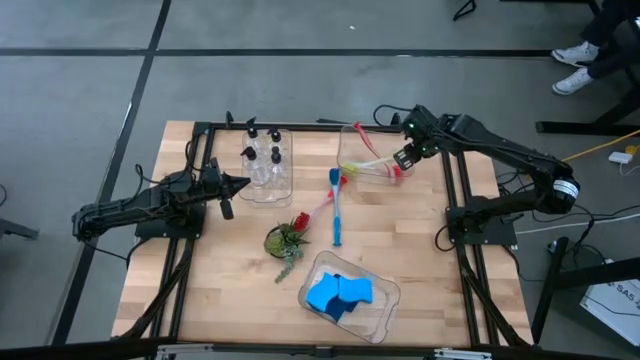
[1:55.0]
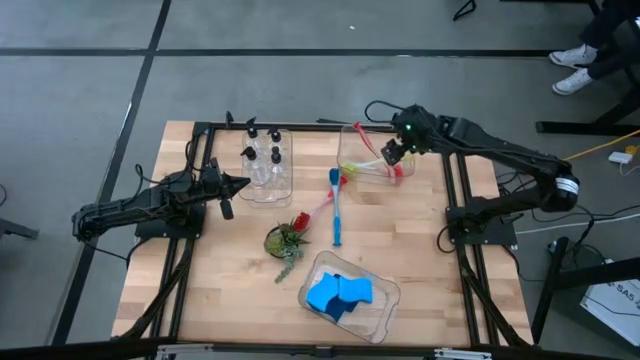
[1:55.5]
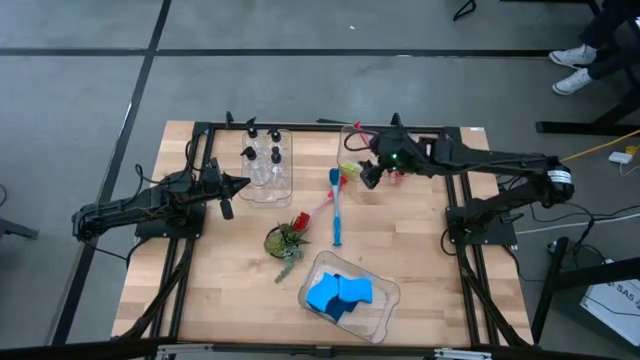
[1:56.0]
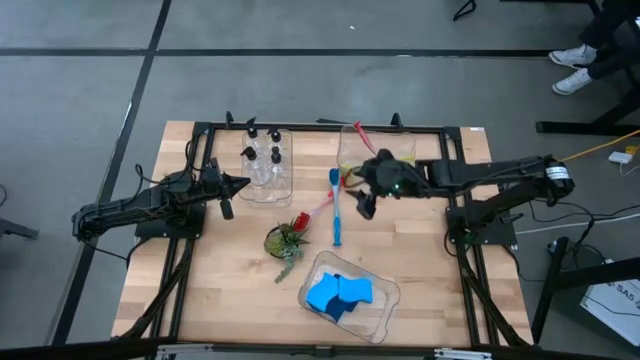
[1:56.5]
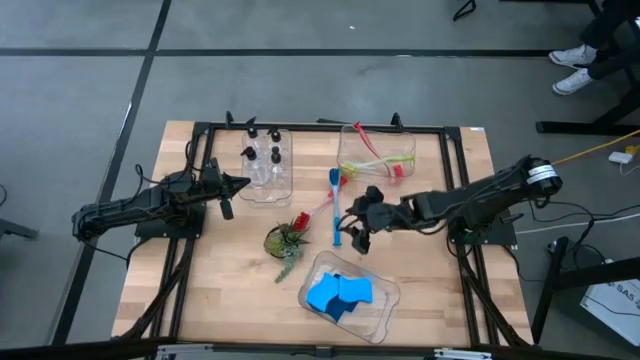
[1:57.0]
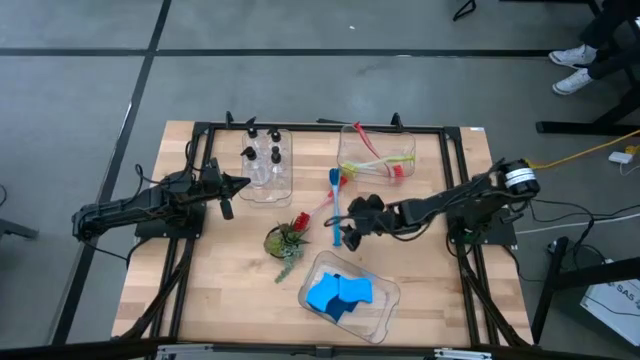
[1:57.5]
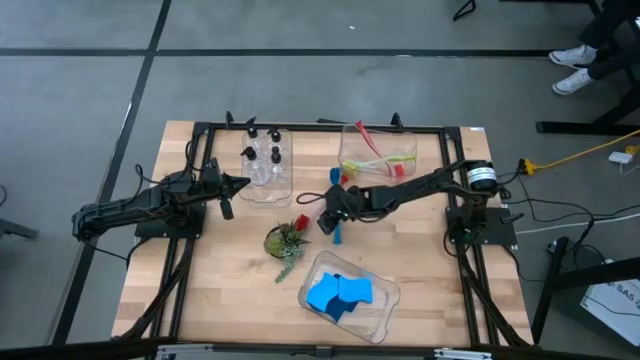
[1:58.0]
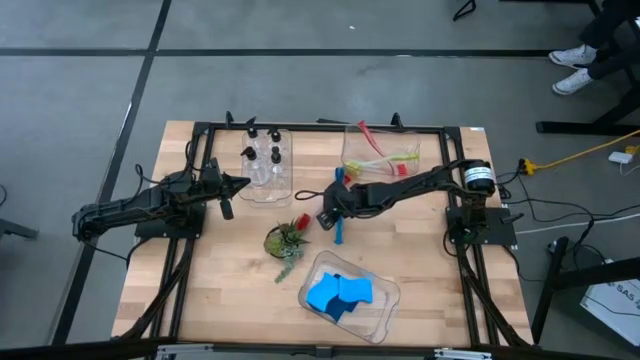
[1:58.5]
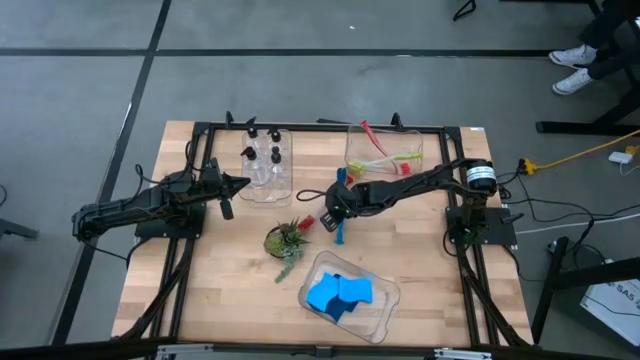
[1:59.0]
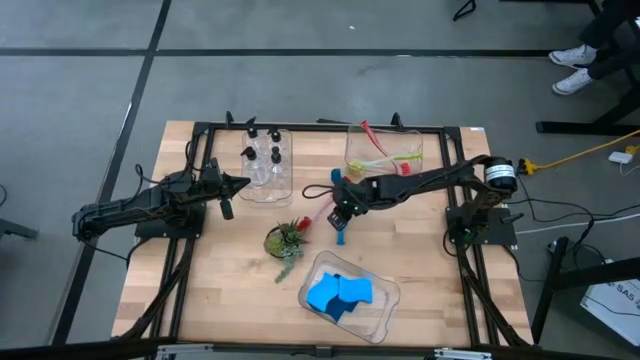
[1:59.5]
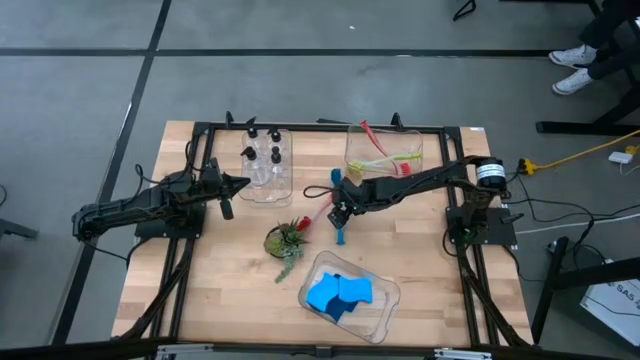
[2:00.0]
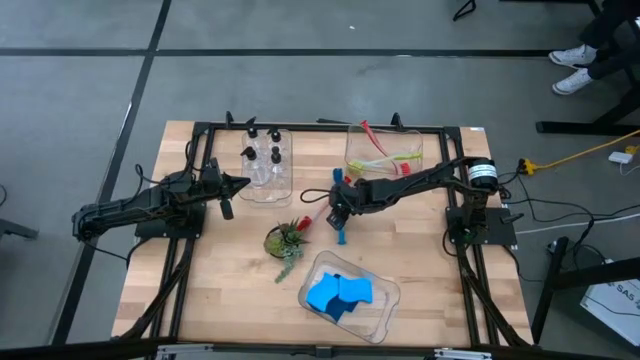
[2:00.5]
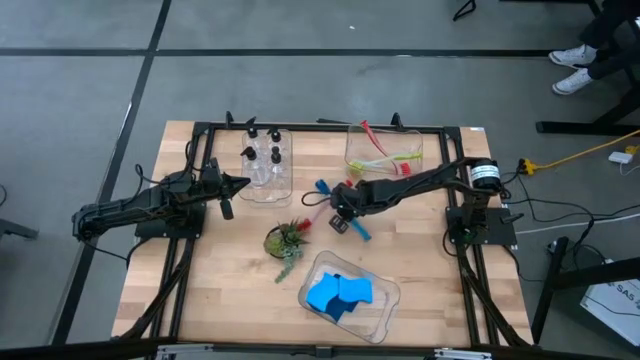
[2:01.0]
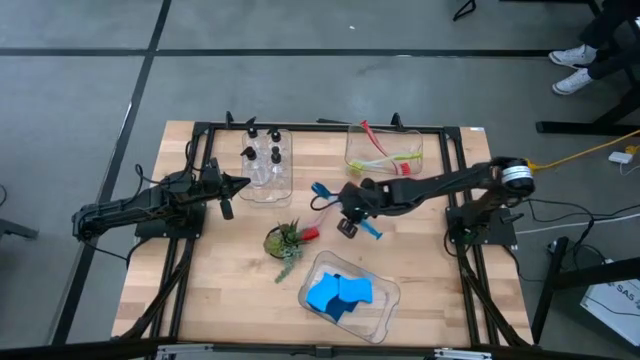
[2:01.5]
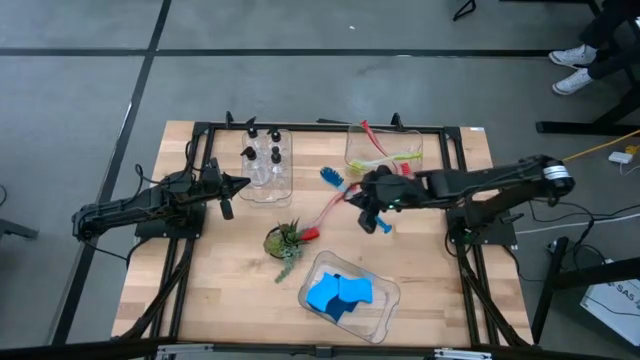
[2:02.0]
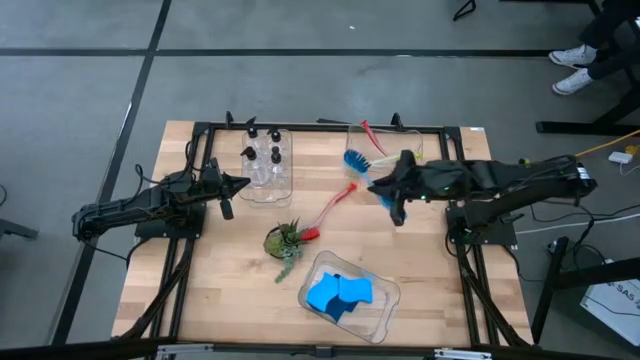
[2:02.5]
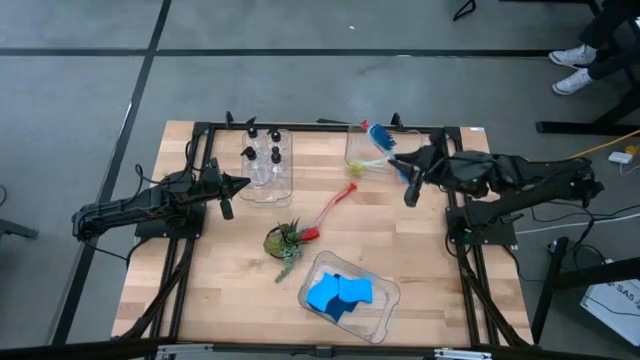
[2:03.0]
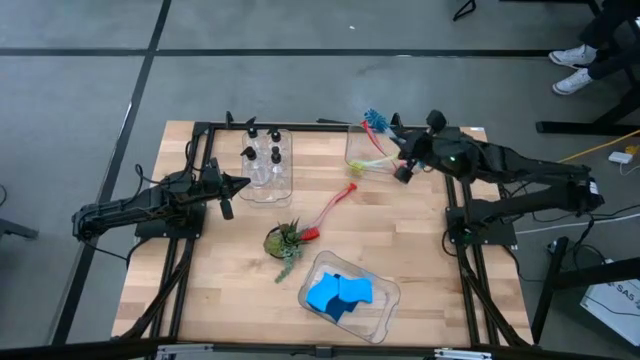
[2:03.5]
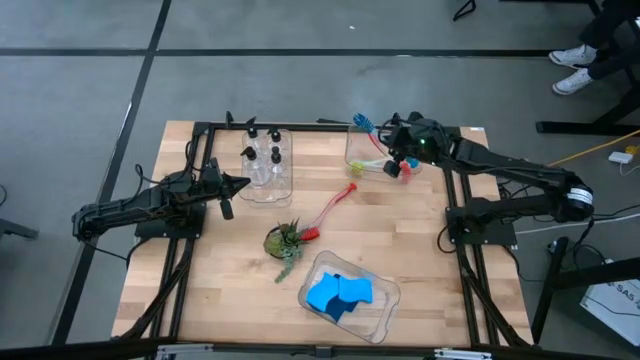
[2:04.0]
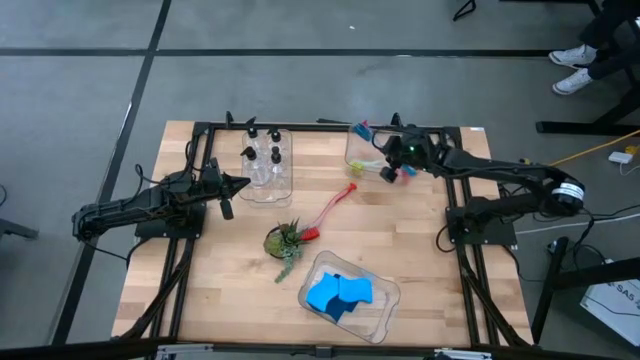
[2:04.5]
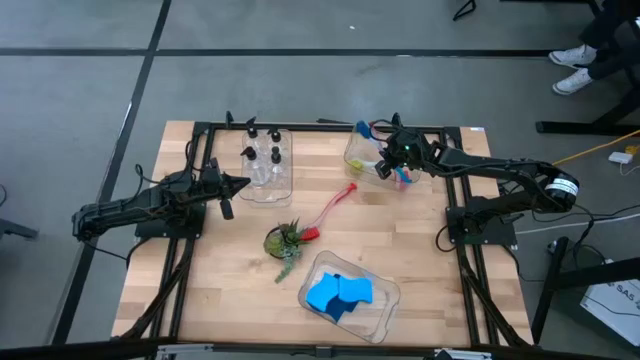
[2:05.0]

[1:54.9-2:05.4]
Task: Pick & Place Kitchen Sink Supplies
Put the blue dish brush into the top right transparent bin

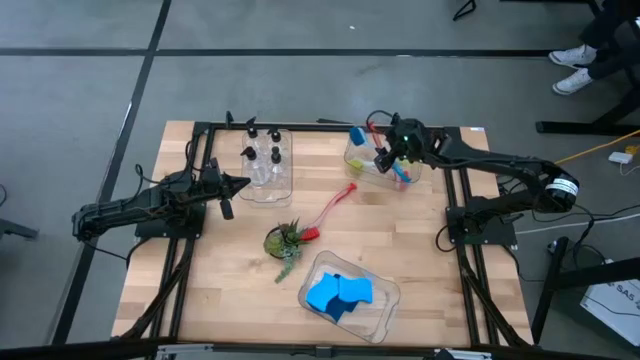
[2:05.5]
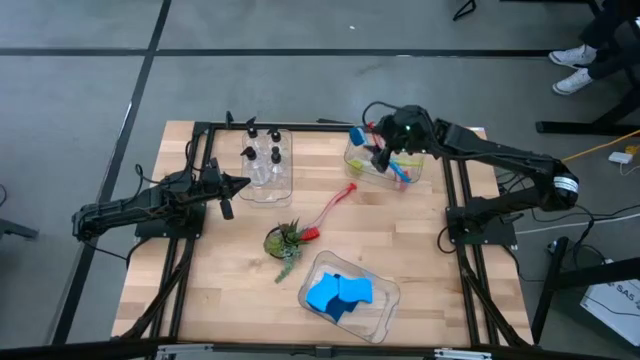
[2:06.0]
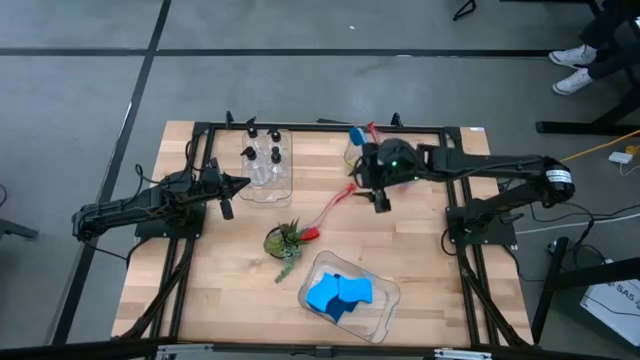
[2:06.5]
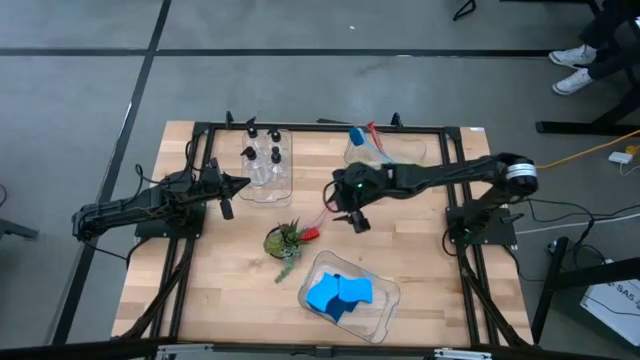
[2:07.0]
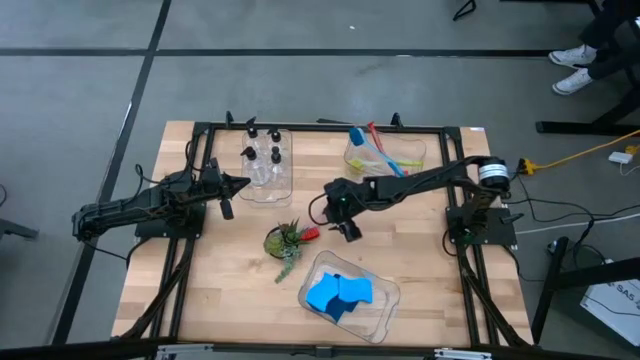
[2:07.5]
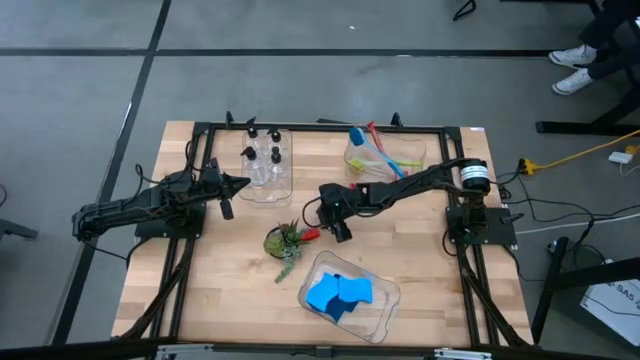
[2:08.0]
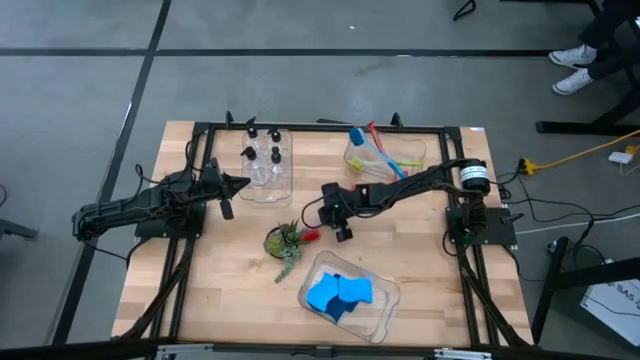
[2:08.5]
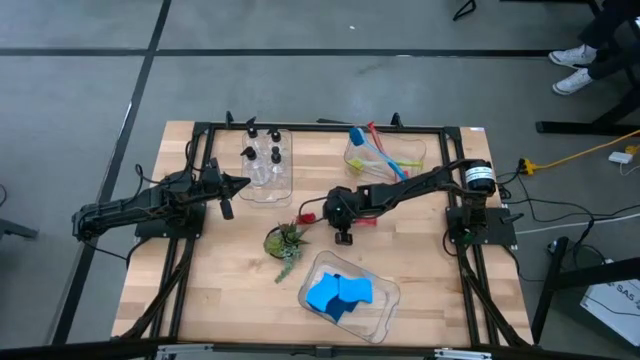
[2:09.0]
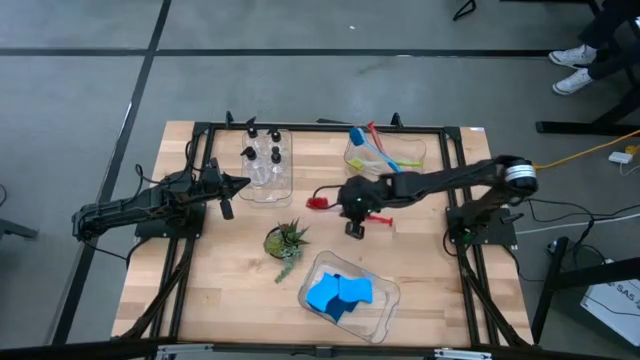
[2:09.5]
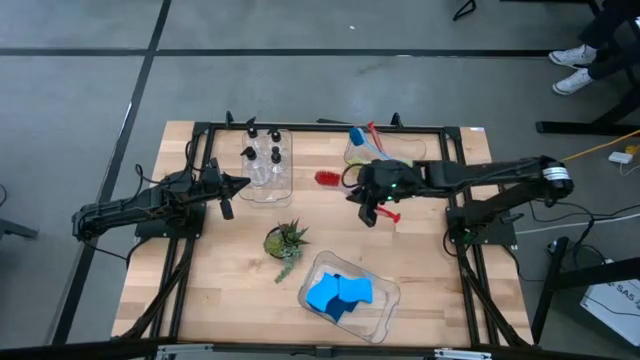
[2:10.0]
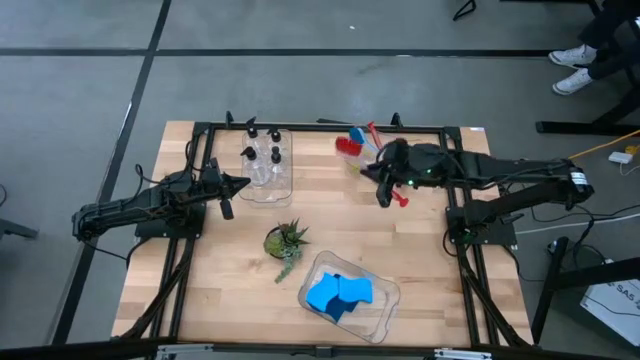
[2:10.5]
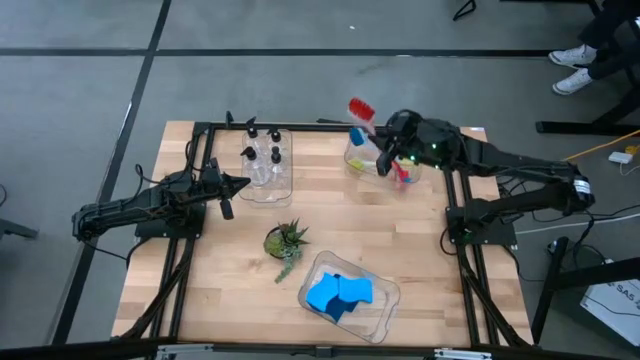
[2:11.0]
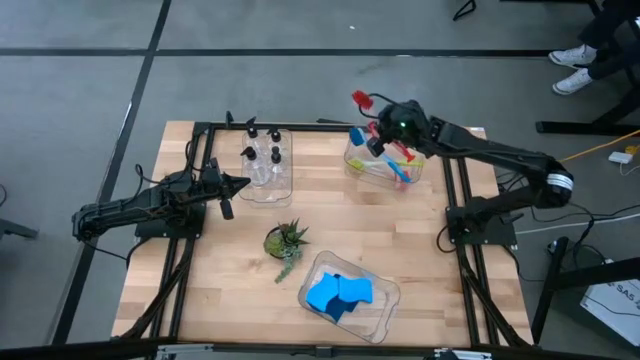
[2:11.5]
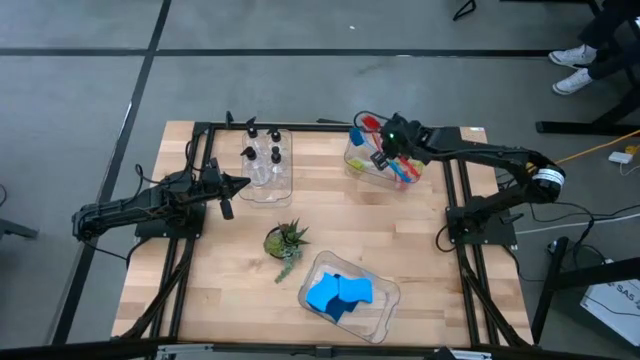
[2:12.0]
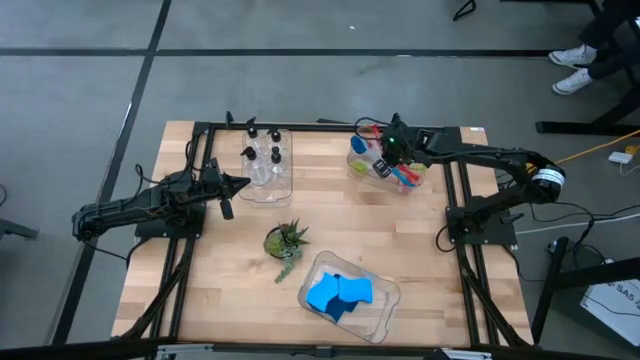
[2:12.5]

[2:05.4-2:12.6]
Put the orange dish brush into the top right transparent bin

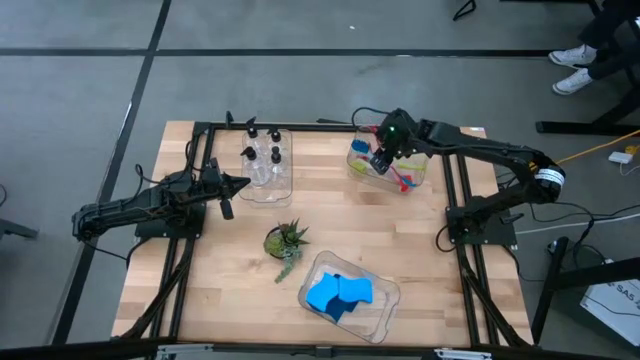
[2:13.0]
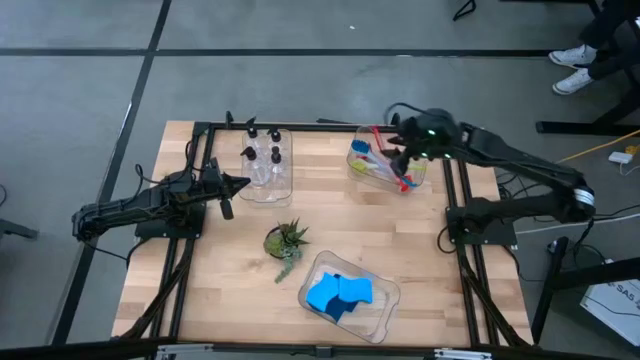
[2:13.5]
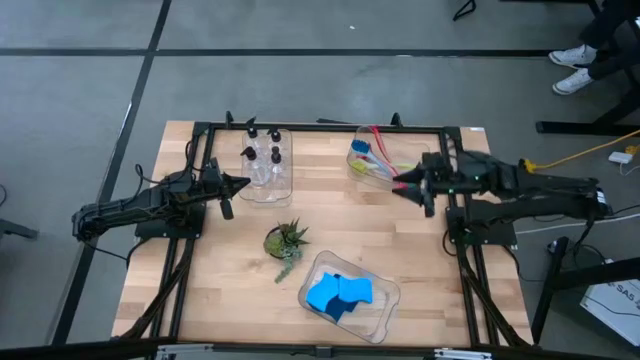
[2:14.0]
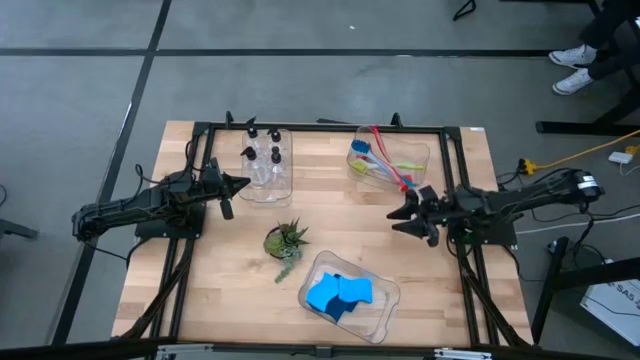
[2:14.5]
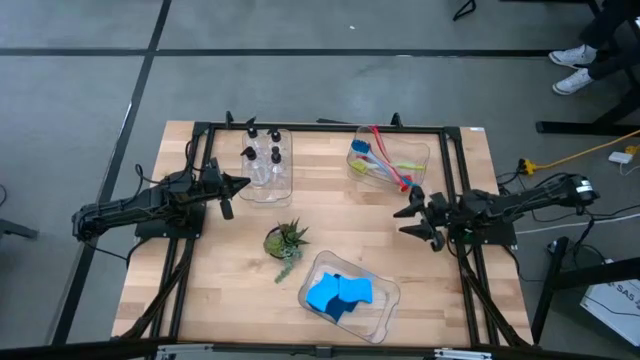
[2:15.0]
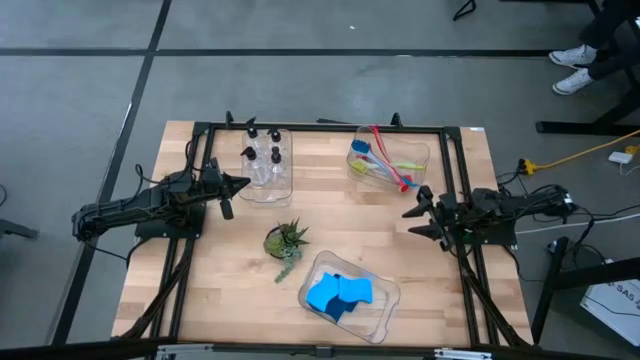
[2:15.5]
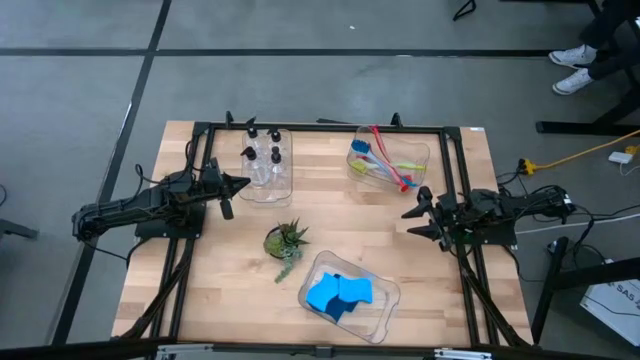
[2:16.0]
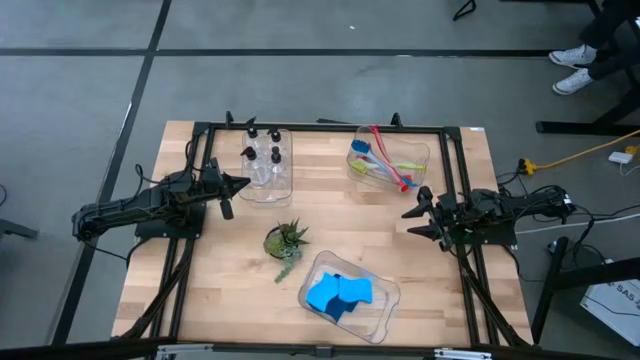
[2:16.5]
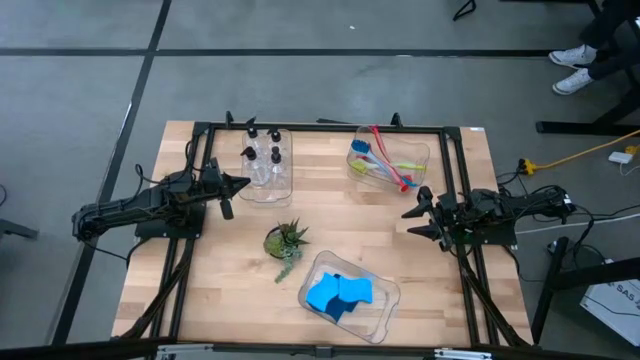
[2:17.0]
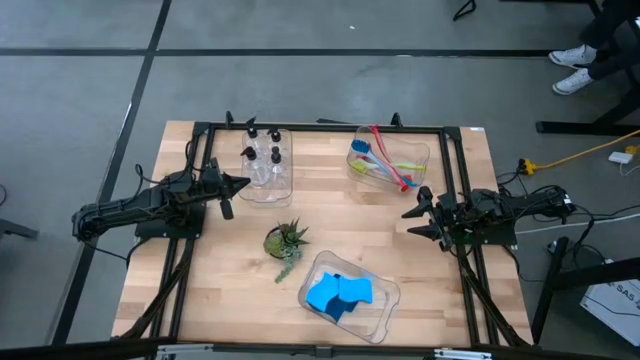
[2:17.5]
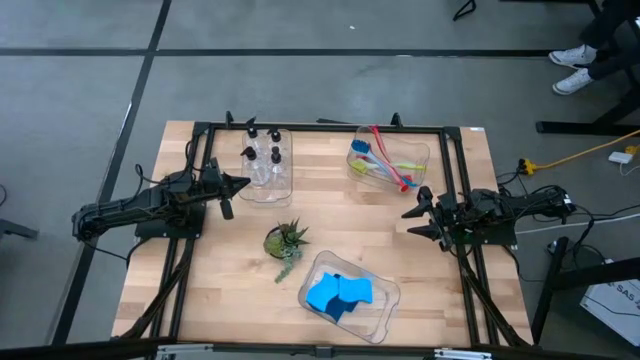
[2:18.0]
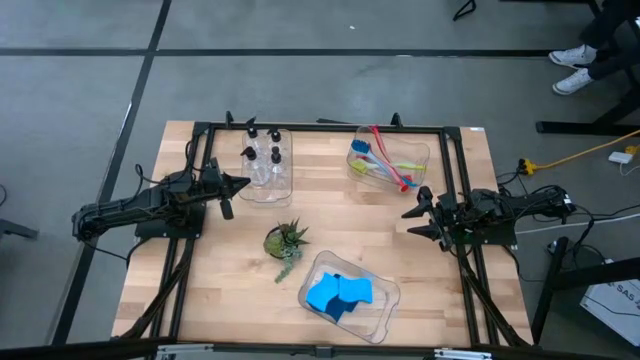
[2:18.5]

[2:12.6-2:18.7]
Return to Home Position
